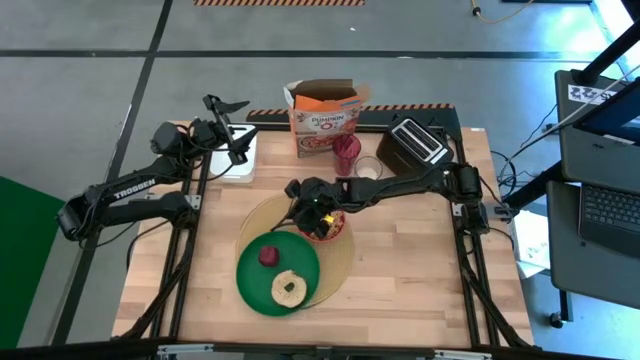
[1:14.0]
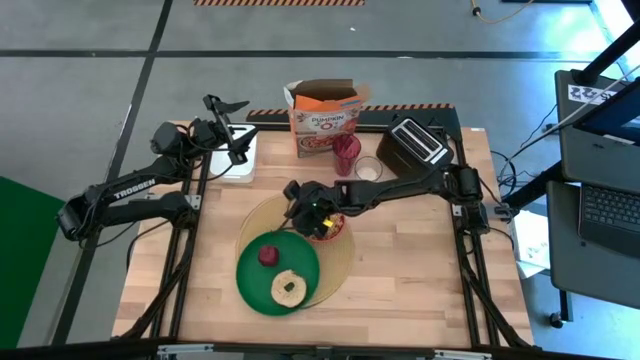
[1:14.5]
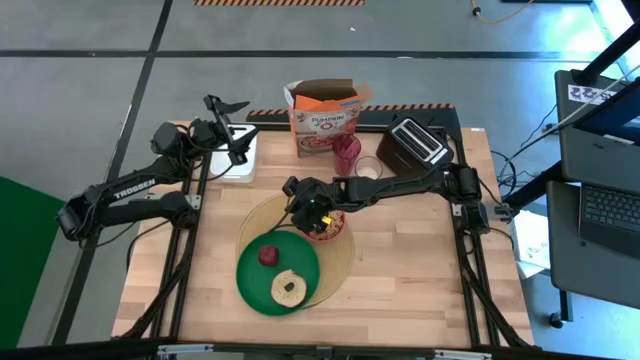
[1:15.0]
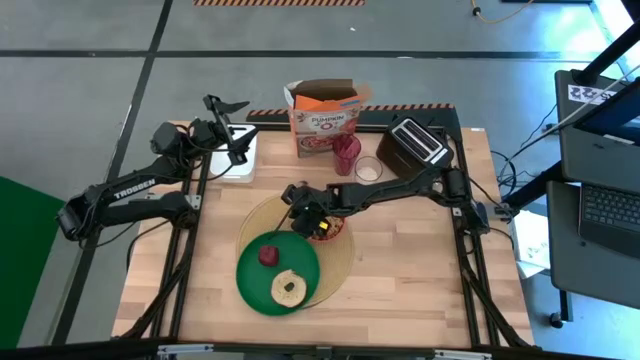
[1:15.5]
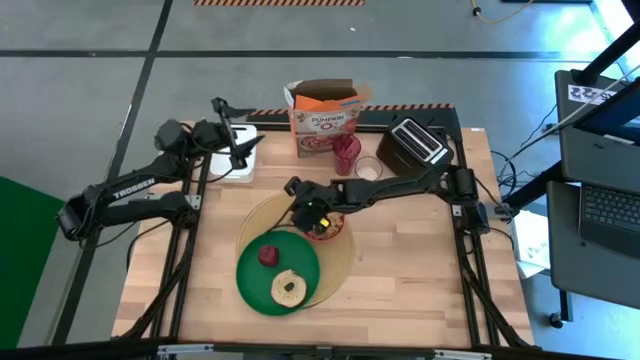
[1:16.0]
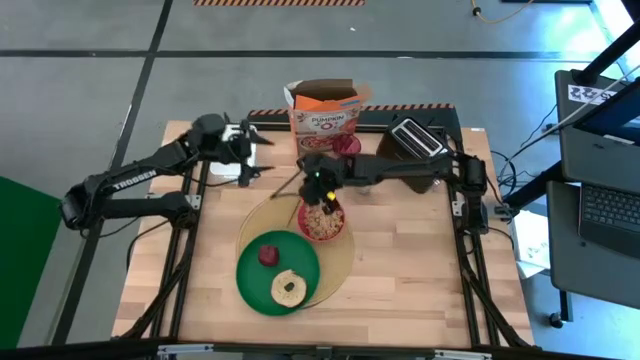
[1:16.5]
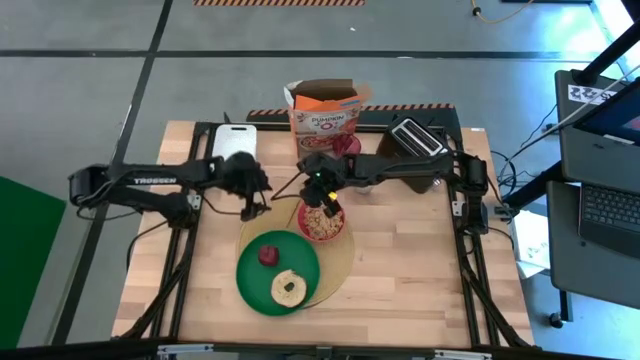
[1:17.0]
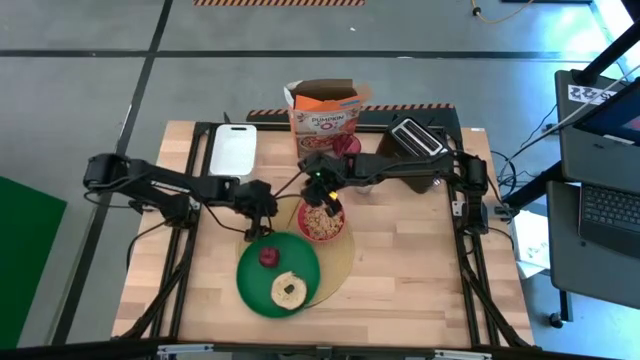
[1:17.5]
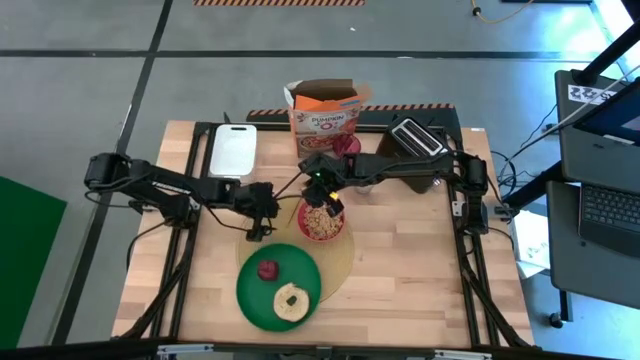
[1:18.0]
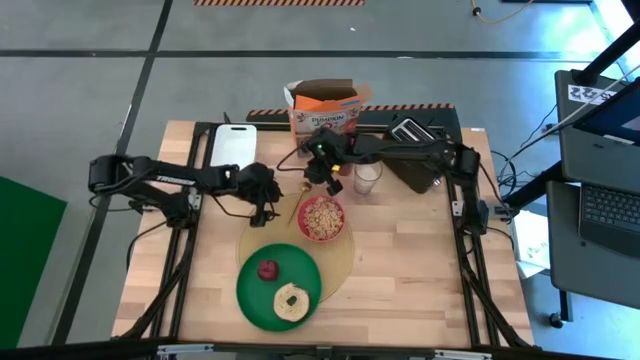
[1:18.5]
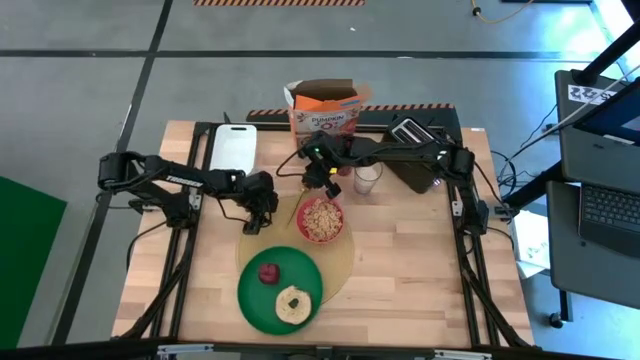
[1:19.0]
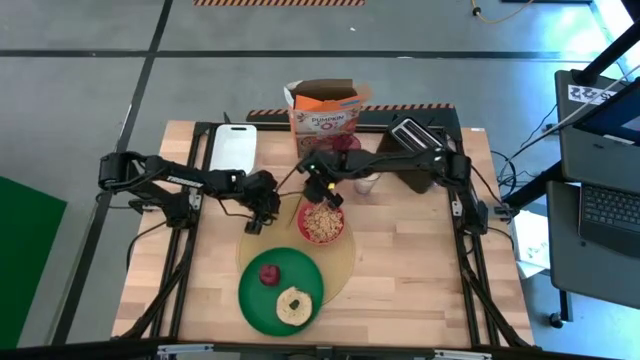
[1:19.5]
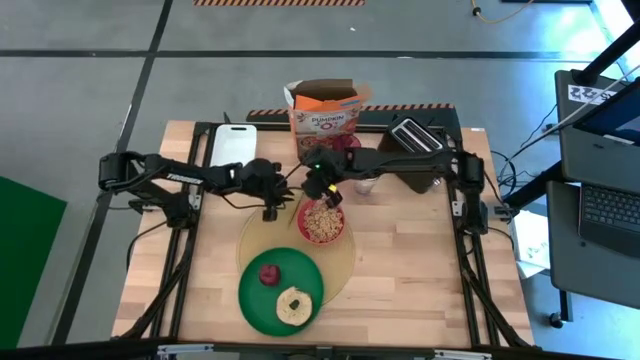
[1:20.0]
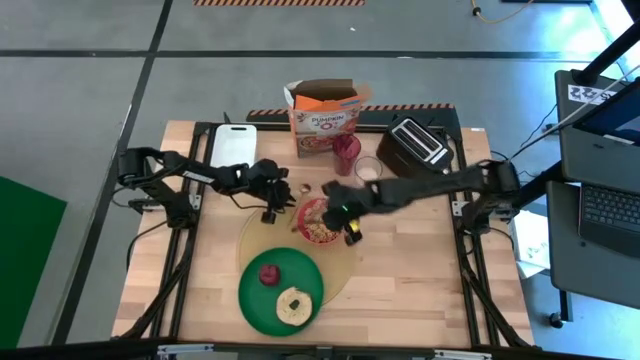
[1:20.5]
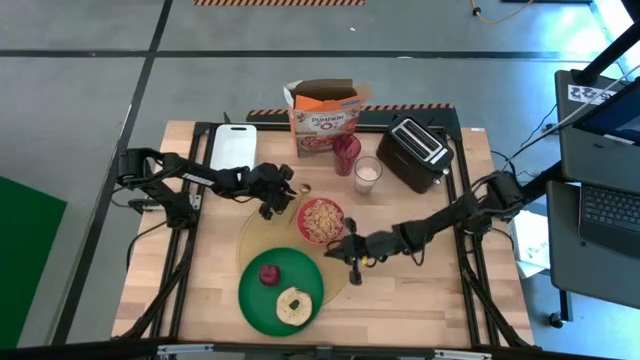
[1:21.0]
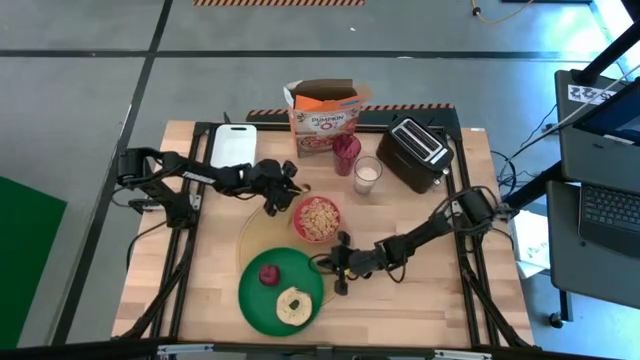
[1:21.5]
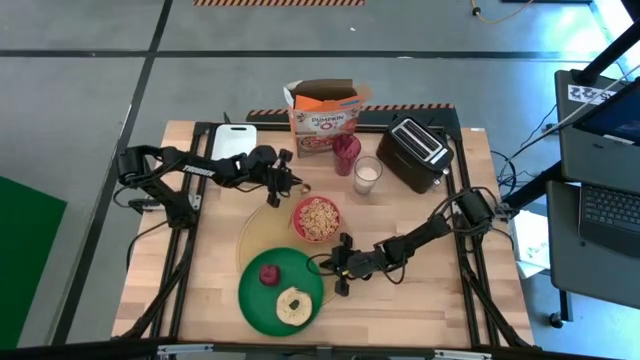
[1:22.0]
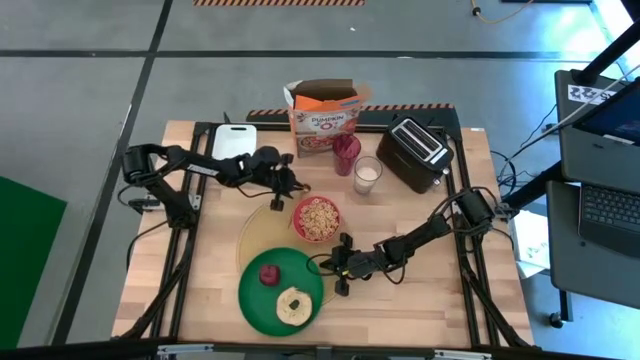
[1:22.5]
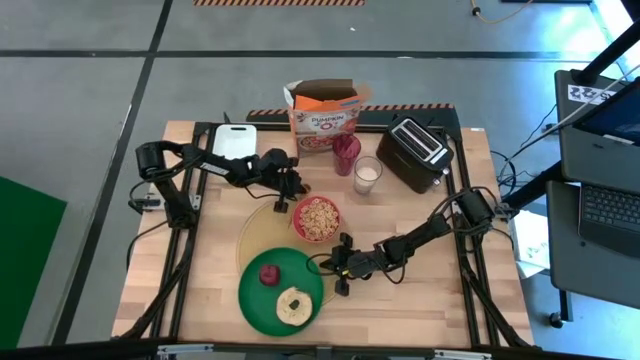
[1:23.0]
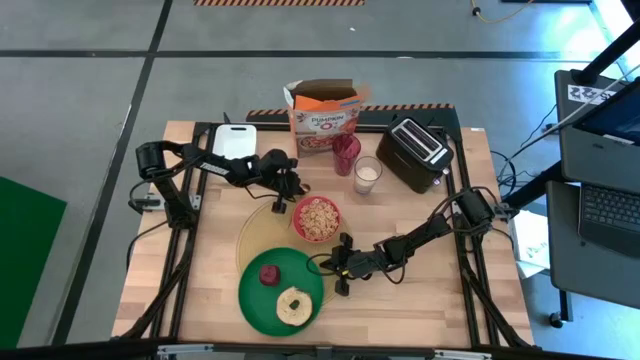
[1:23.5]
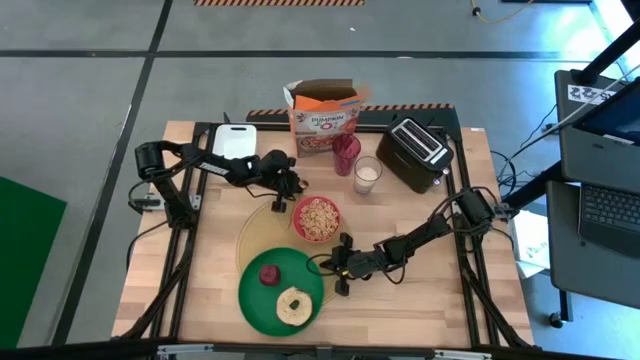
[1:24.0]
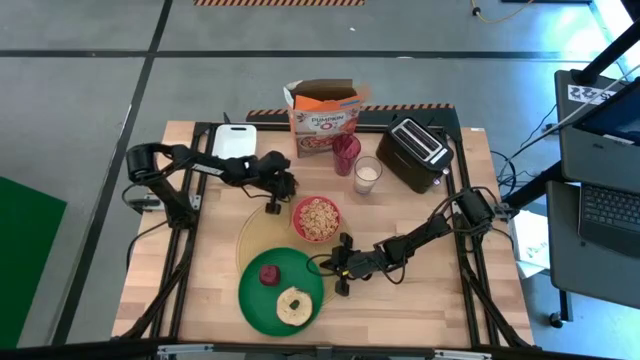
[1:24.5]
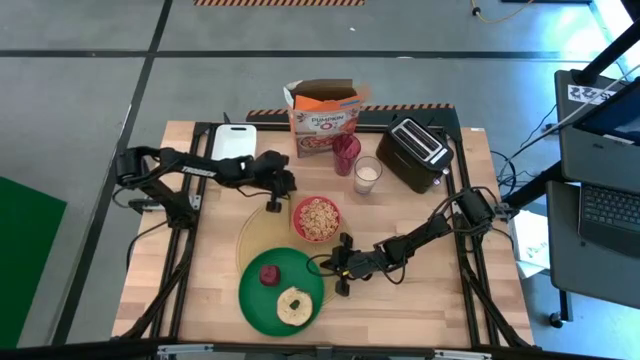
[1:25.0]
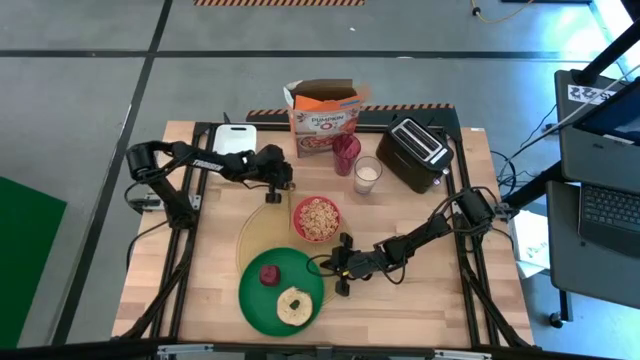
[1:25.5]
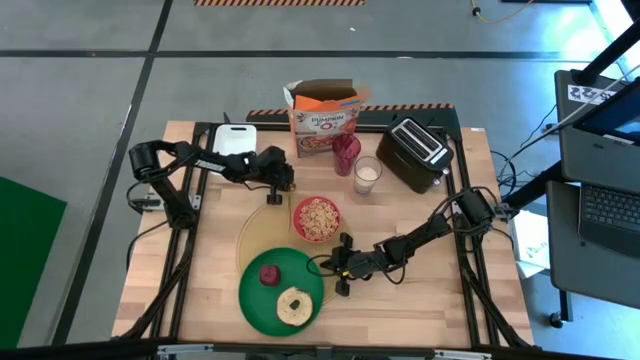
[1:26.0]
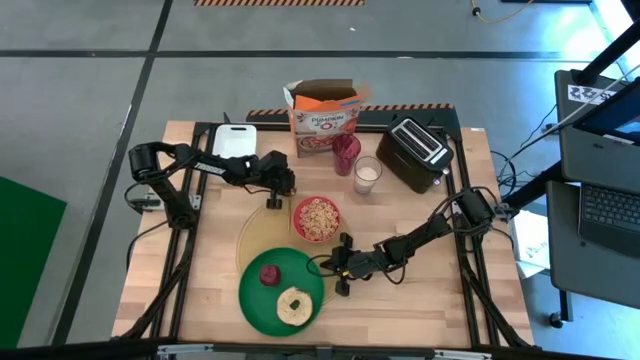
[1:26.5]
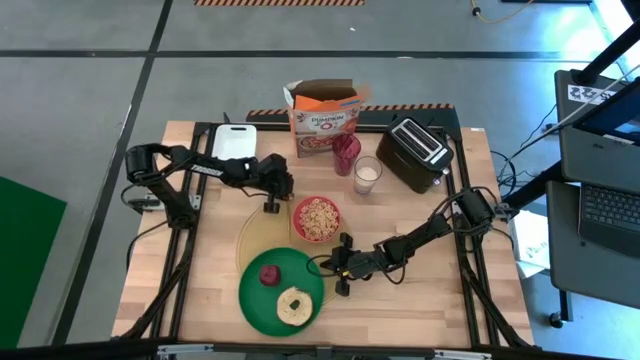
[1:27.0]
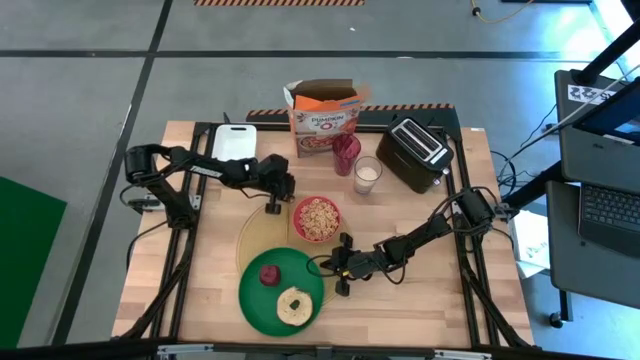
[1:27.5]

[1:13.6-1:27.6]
Task: Arrange a breakfast setting
Put the spoon on the brown table mat

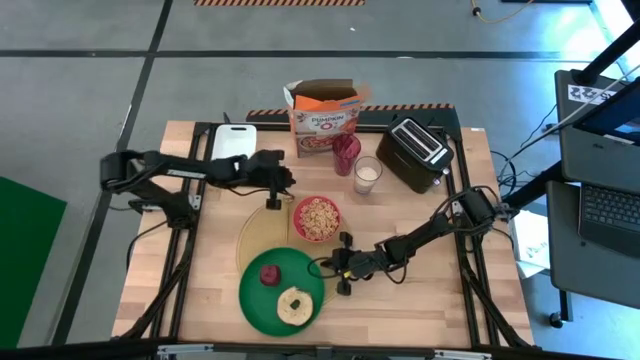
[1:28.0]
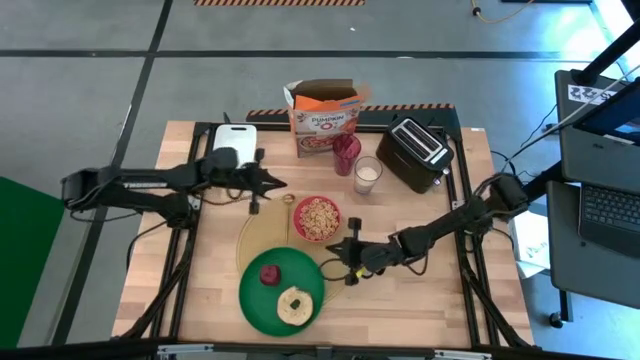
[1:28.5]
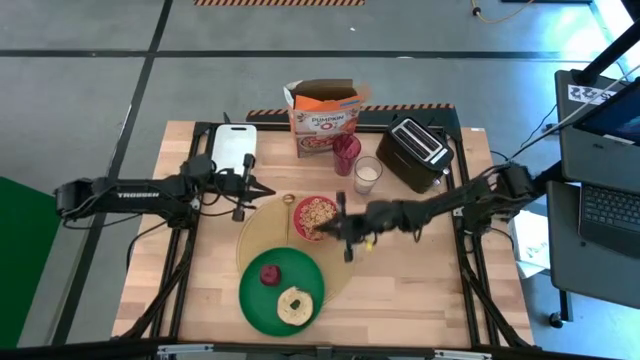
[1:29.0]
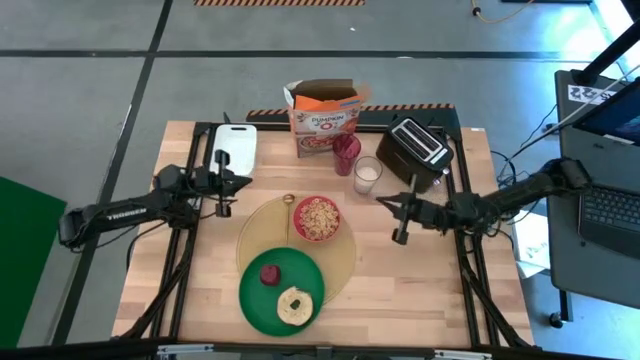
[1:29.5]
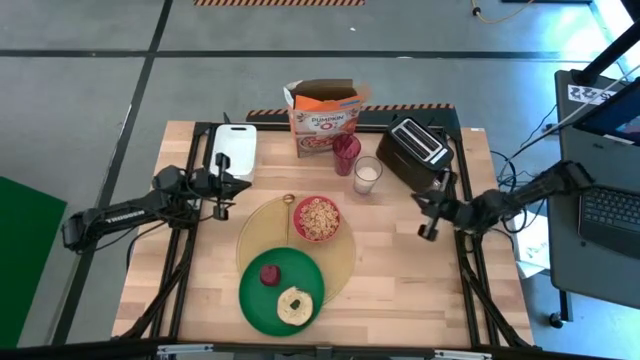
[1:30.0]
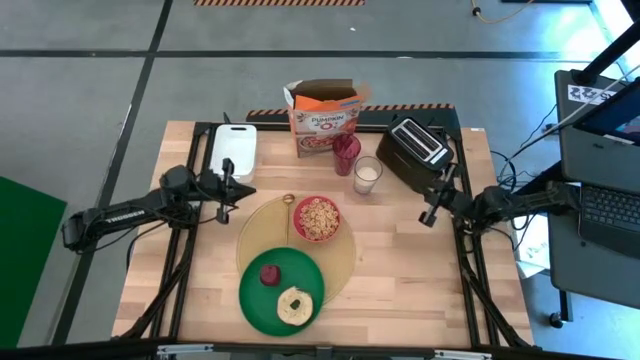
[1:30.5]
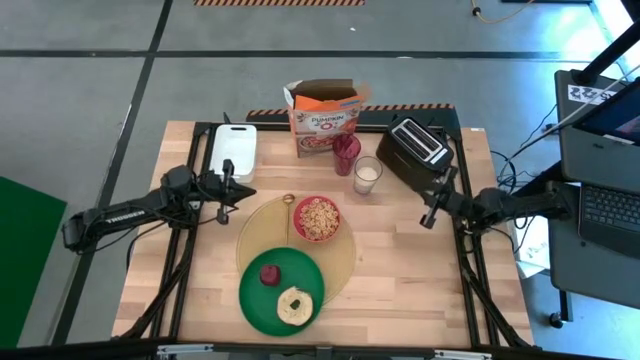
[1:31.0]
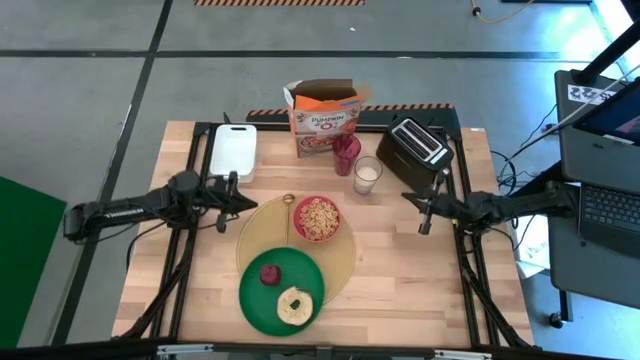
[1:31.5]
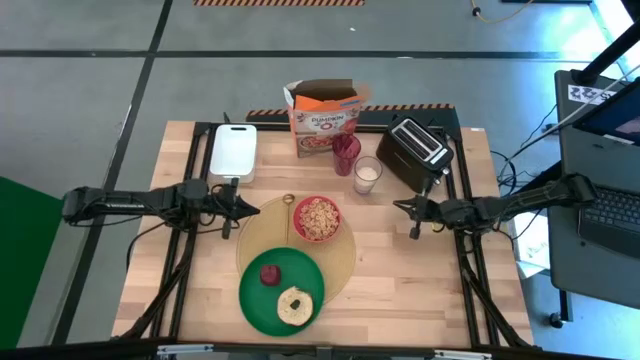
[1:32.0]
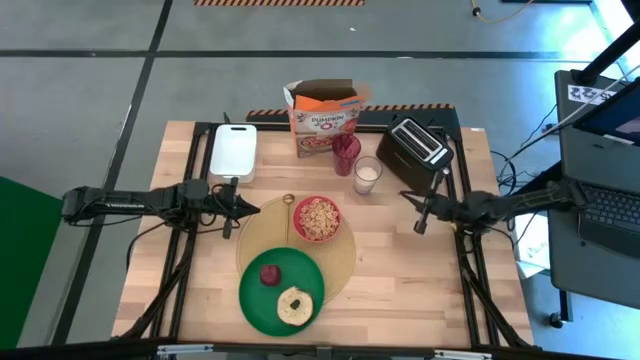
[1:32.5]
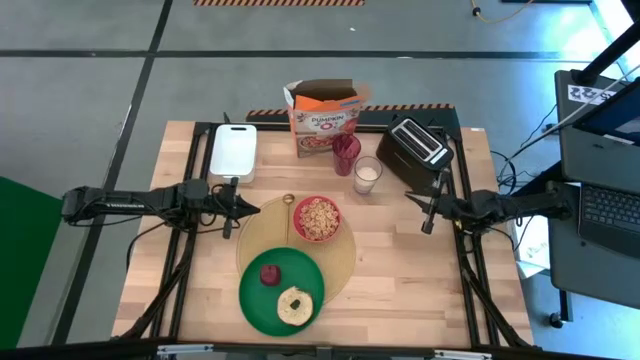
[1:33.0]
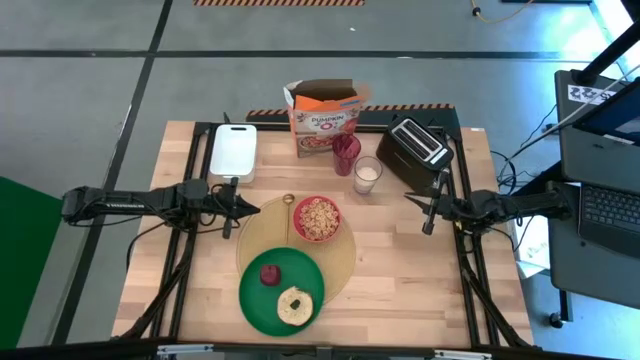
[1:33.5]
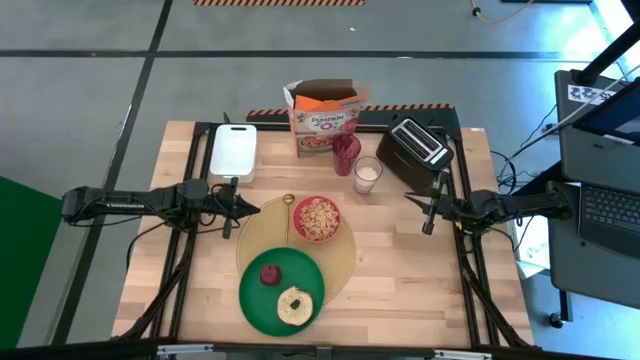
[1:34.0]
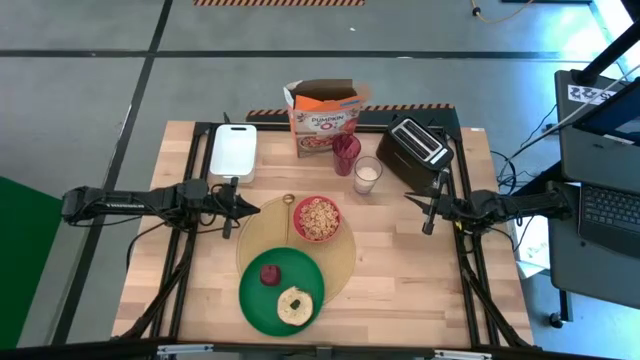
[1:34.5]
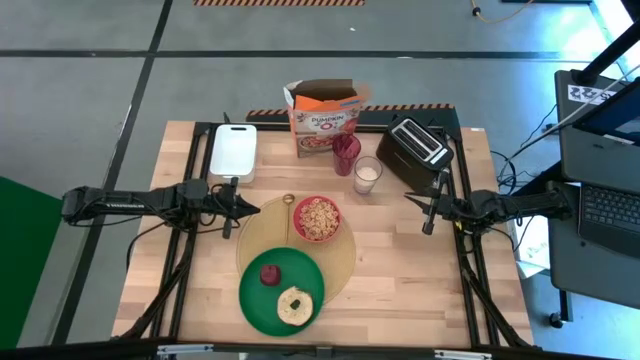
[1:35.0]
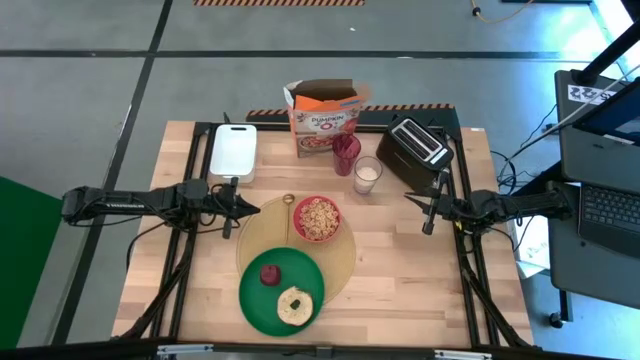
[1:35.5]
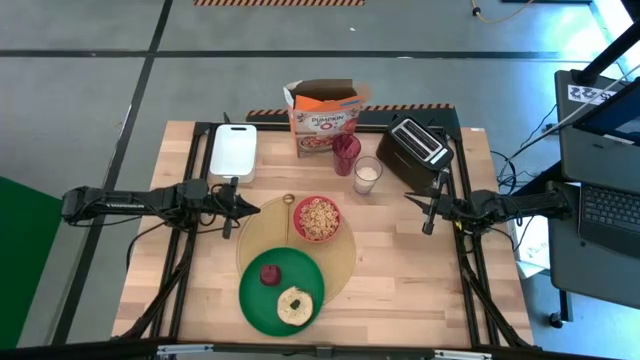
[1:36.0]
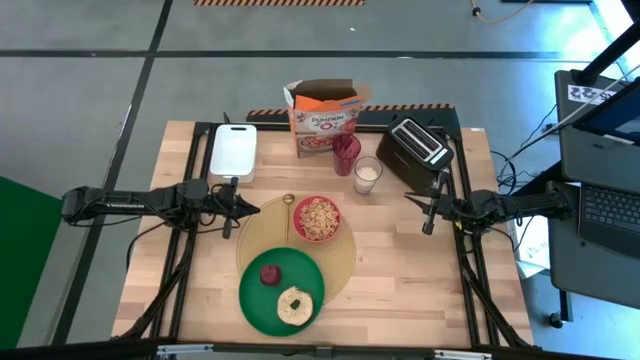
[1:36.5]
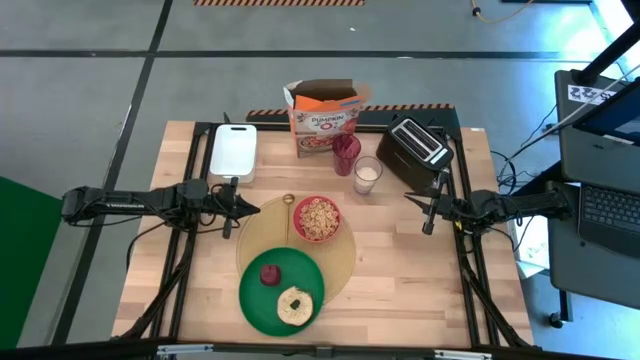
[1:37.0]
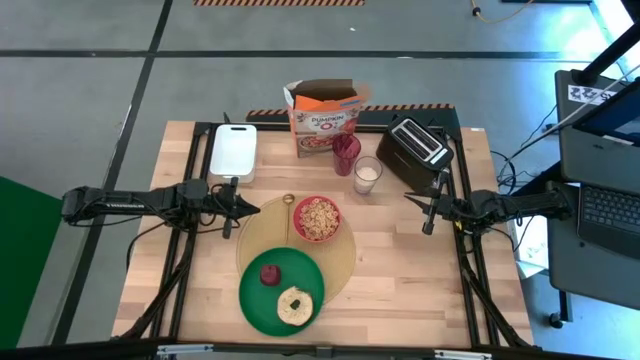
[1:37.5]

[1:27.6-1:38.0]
Return to Home Position
